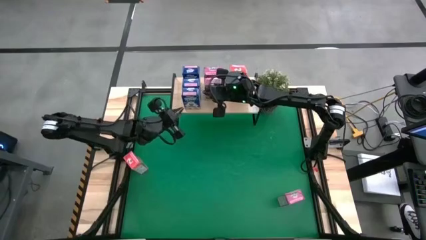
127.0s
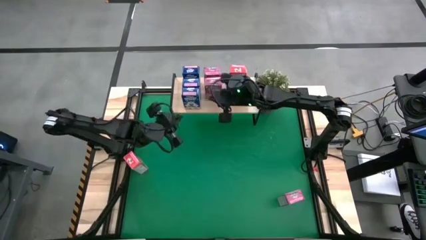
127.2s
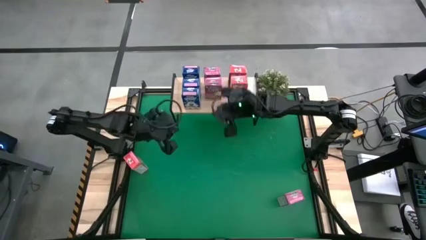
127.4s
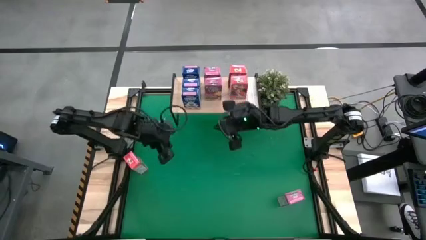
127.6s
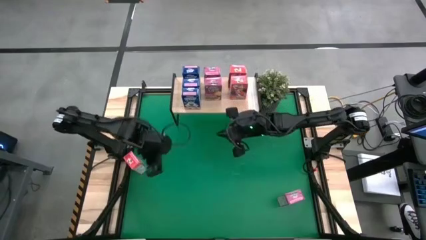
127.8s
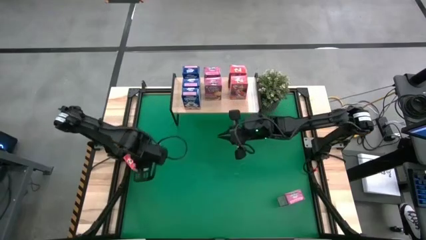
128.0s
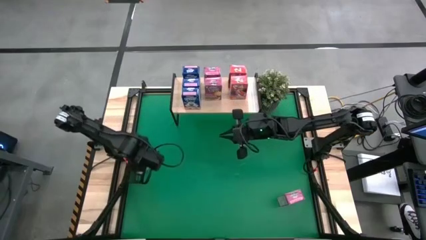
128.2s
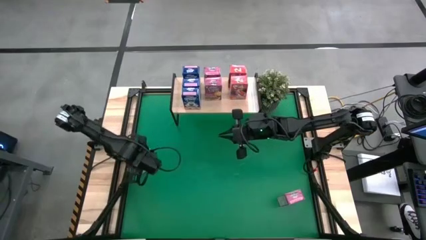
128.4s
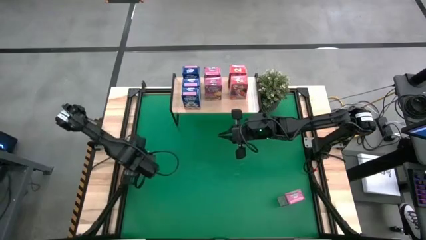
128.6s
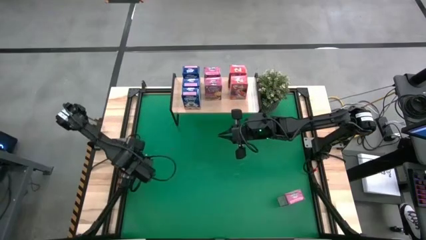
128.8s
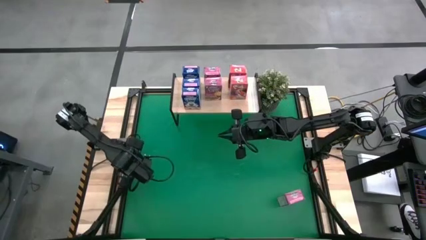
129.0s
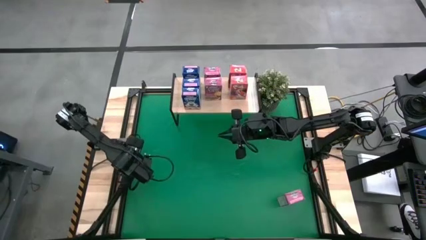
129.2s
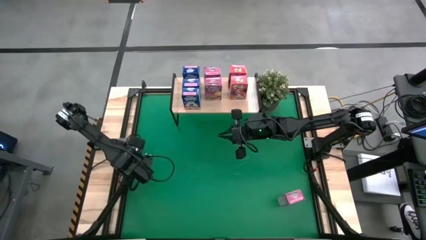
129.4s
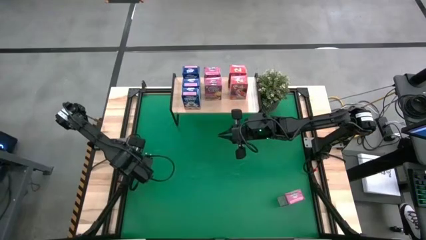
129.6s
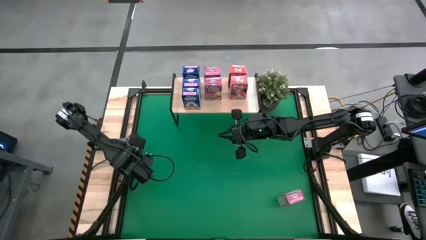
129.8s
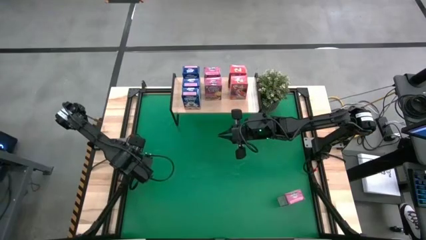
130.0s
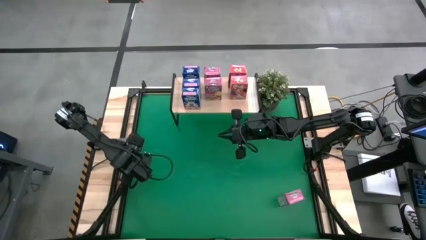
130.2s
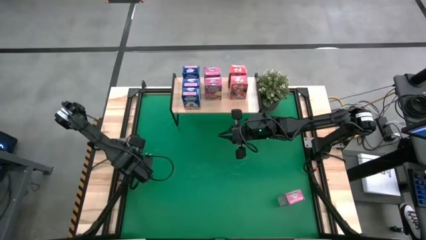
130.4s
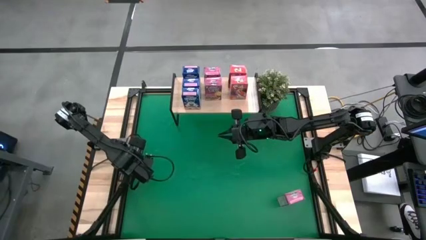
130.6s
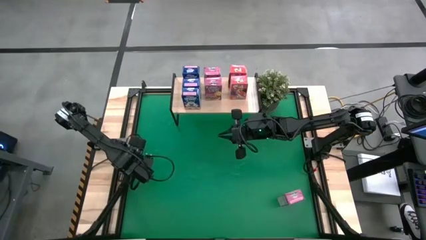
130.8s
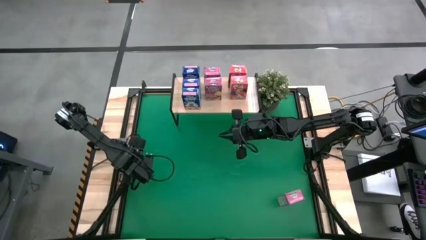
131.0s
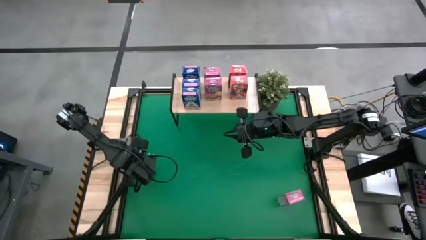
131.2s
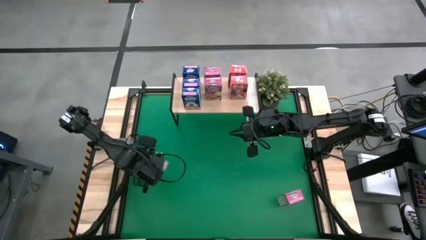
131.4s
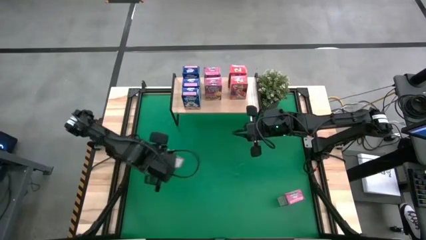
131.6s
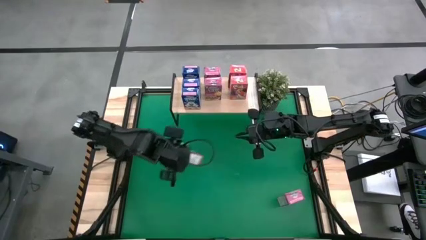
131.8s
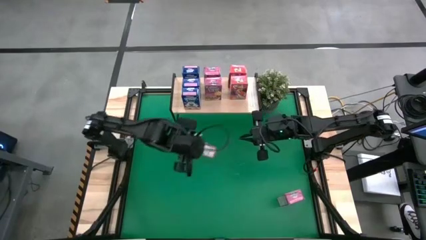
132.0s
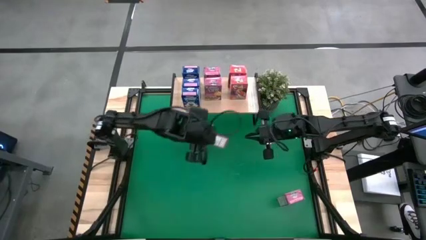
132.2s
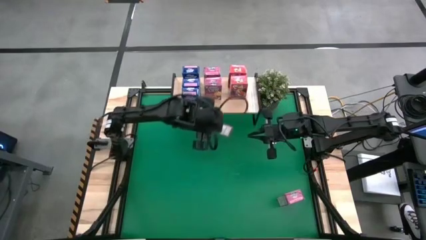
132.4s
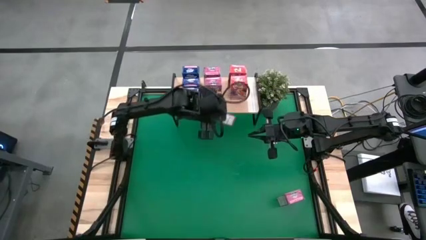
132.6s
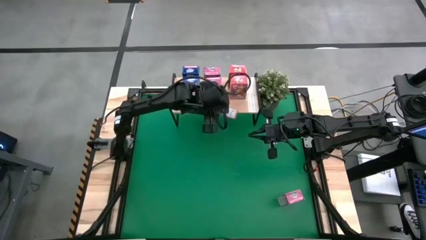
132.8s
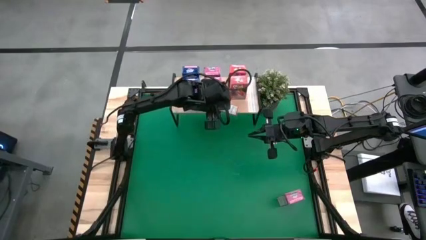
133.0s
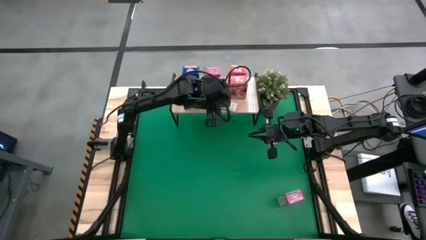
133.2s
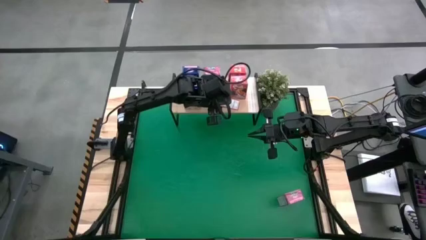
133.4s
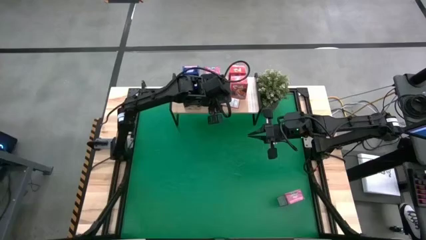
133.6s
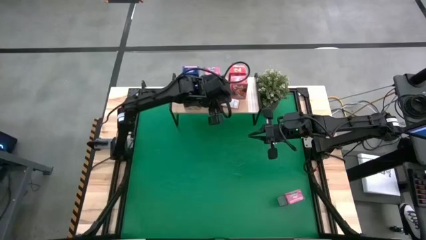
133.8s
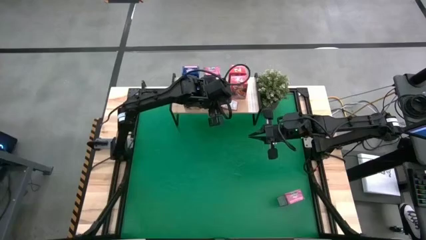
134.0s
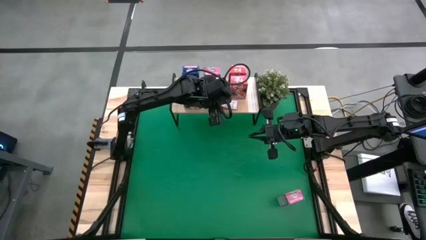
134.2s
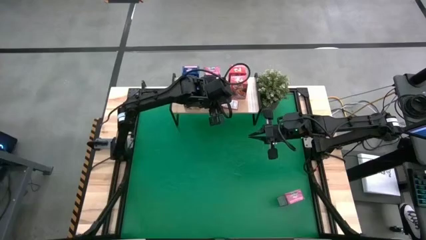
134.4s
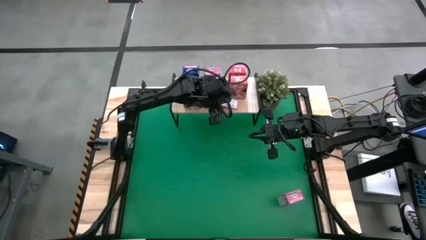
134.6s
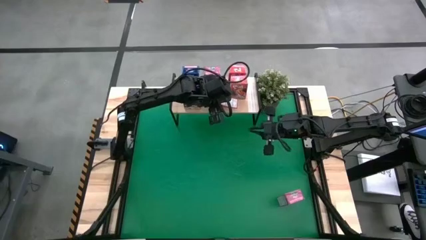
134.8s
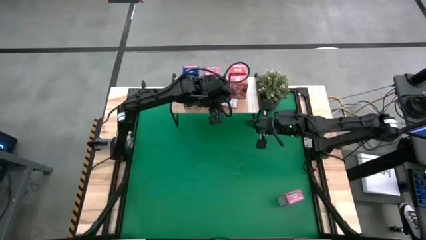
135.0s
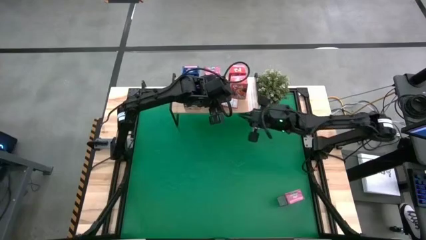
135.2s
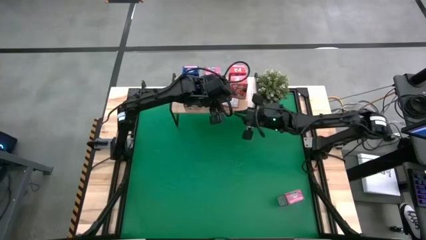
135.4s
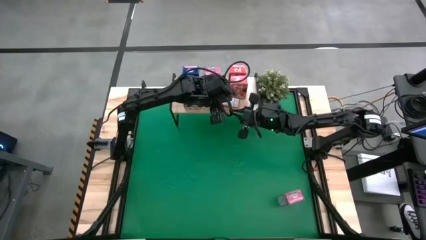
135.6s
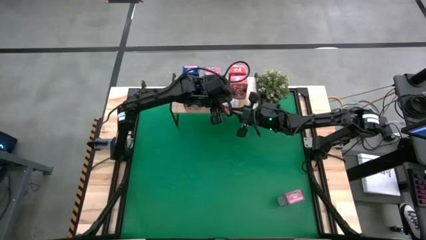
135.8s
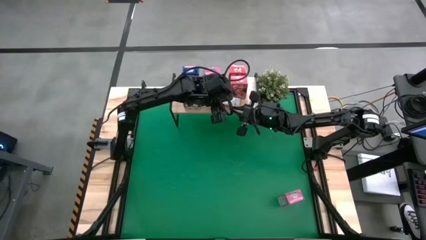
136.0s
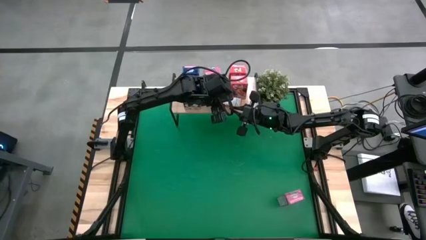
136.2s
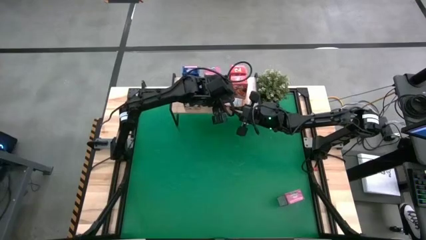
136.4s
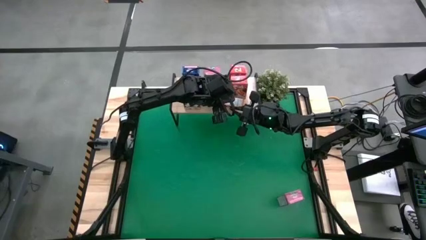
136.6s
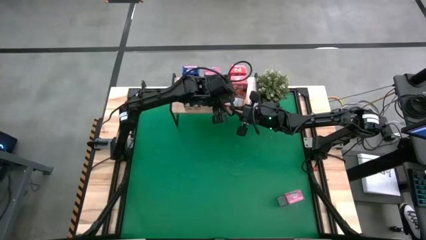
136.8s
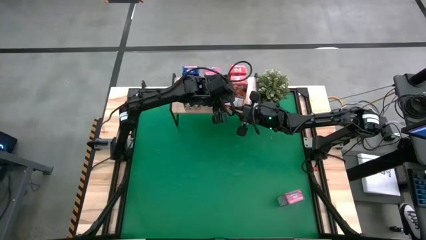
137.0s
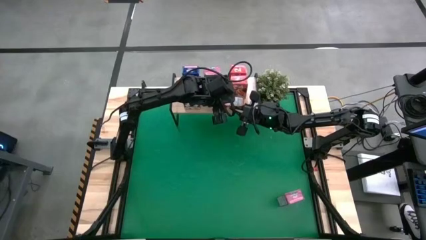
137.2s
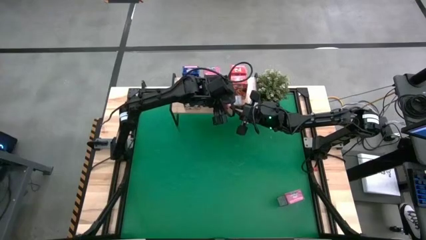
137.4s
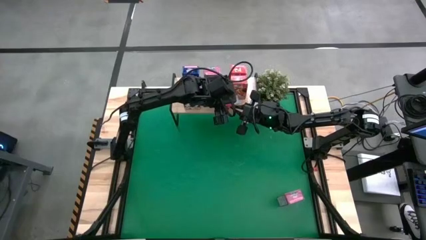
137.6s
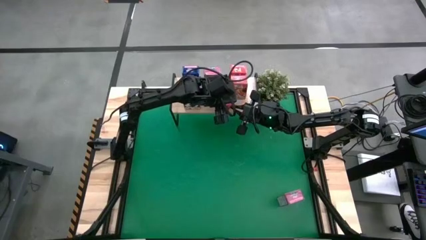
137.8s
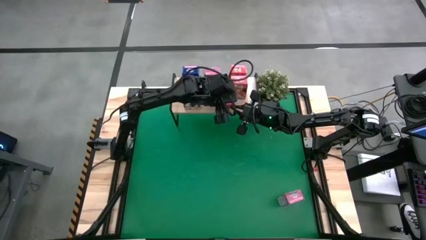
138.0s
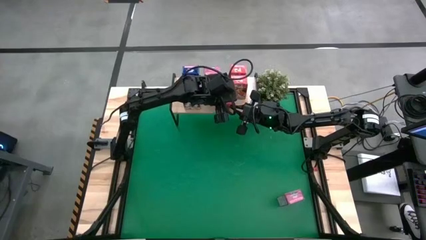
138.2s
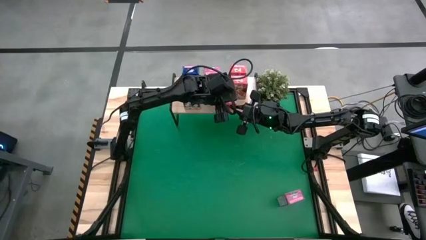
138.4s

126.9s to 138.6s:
Task: Stack cereal on shelf
Put the red cereal box on the shelf aligned with the red cereal boxes

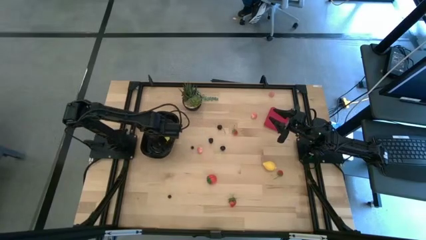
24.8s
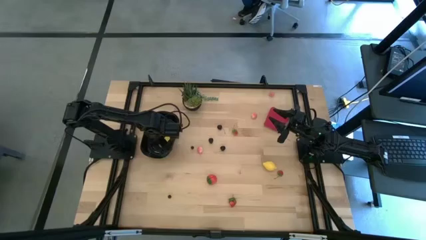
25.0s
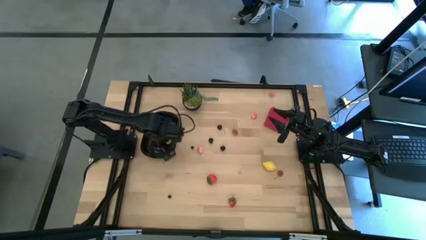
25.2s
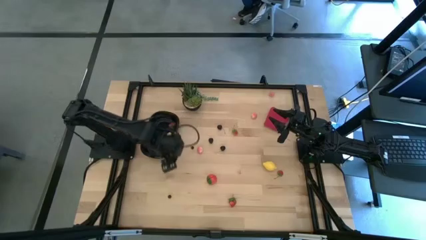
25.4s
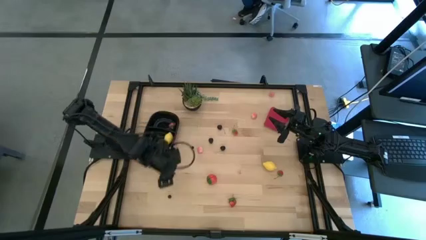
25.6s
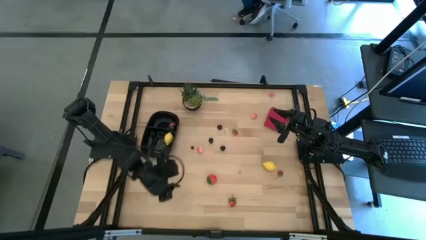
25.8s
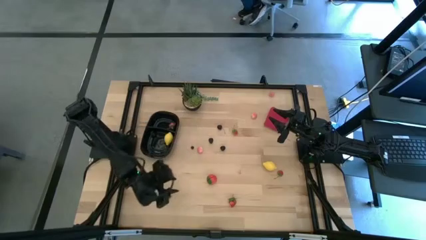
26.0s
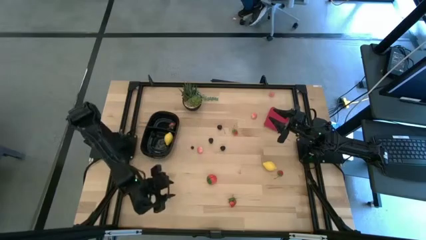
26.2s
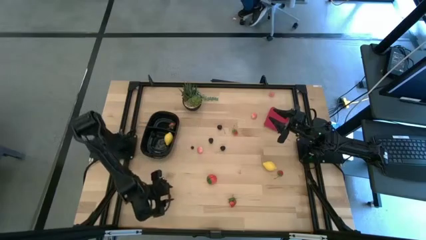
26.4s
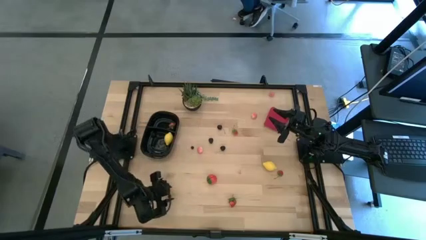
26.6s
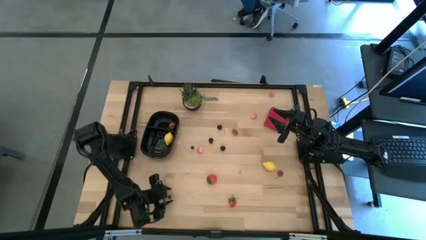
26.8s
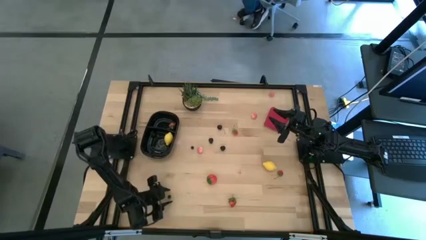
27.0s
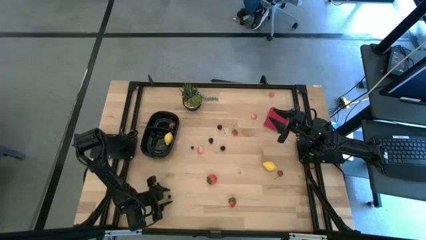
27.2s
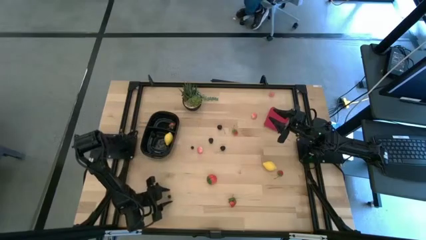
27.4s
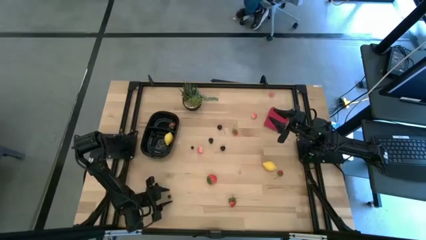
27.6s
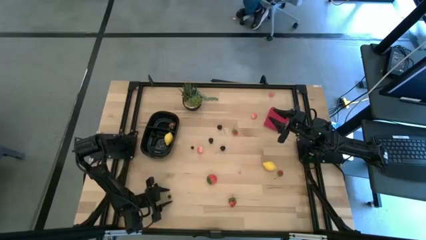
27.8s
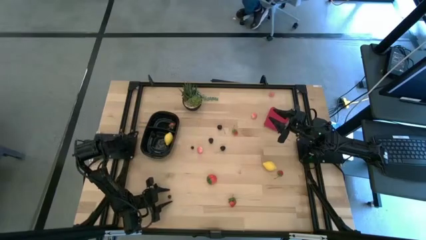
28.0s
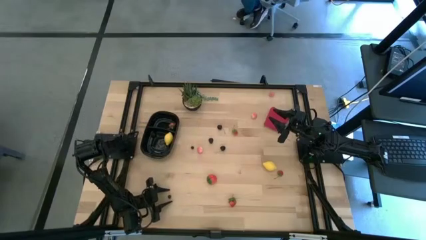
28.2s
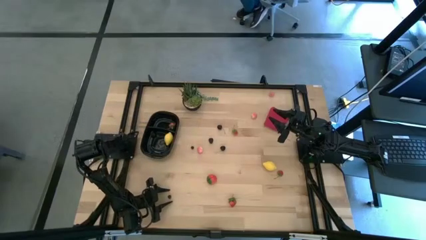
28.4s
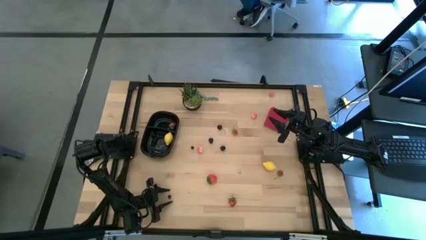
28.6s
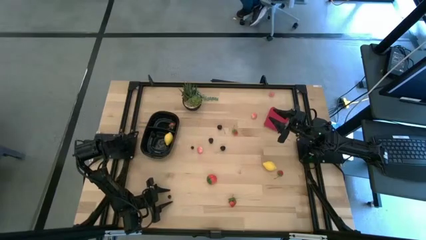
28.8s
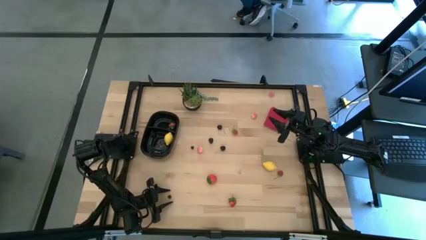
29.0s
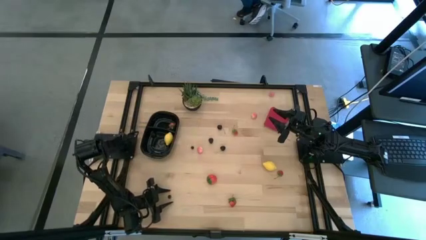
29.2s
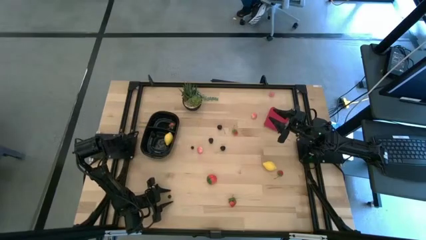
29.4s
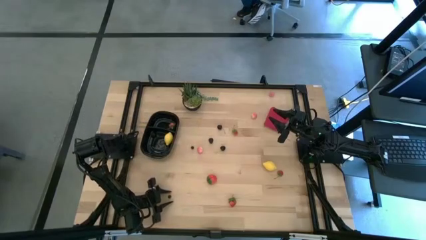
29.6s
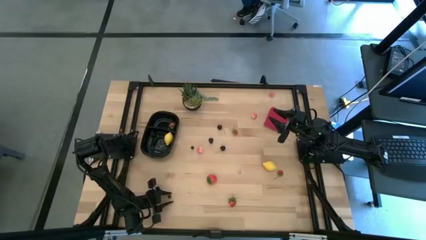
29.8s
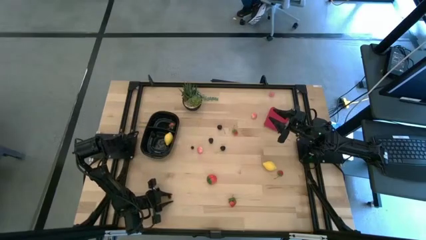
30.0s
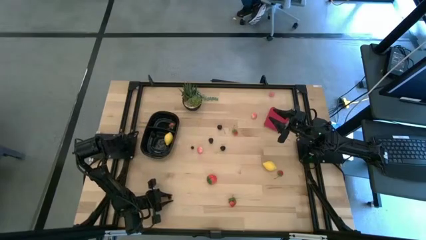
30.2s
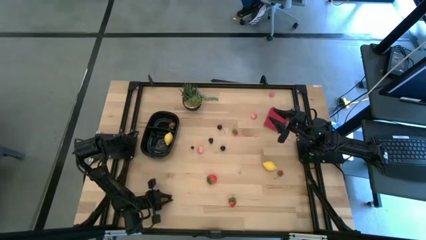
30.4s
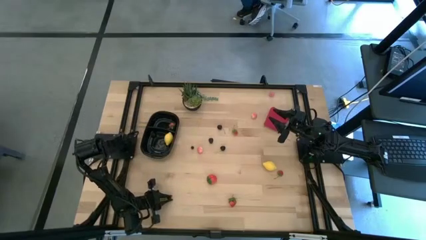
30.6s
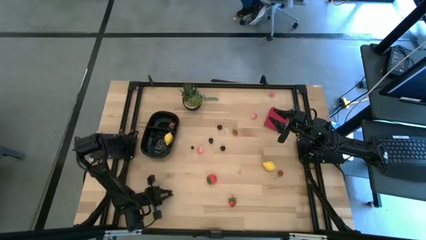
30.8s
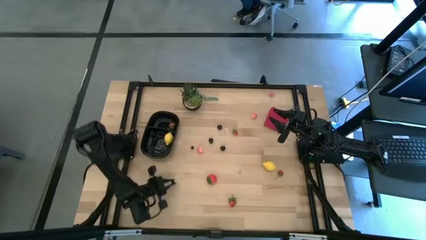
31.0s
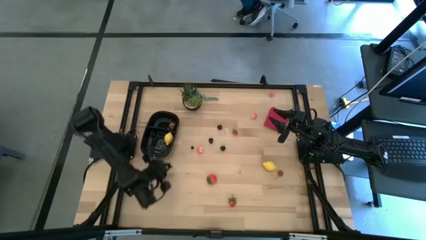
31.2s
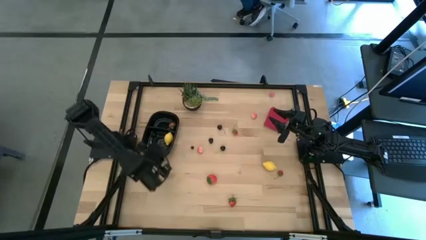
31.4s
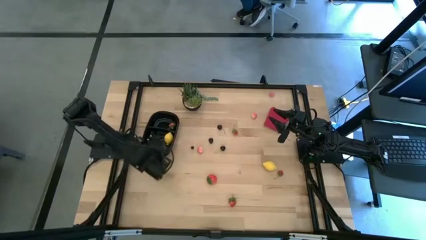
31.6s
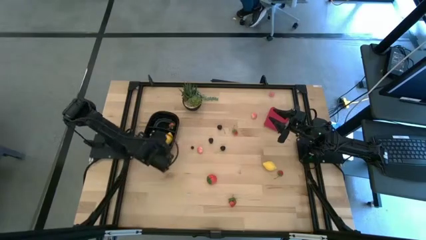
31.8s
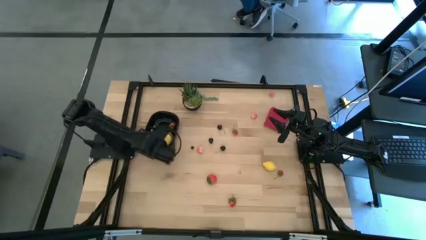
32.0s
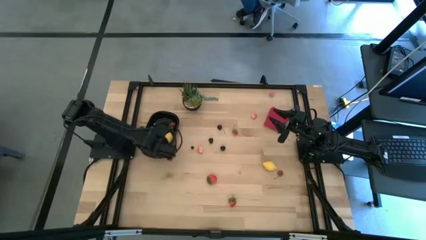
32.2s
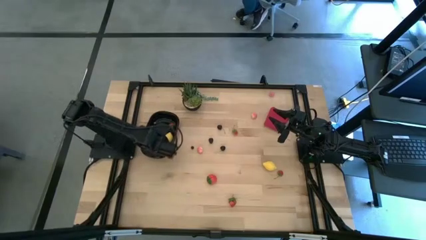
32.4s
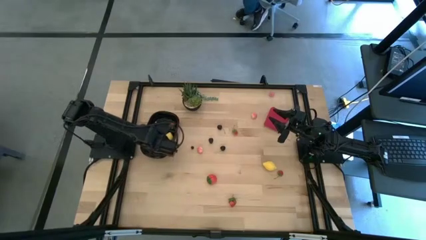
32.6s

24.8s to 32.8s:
Task: Pick and placing Produce into tupperware
Put the blueberry into the black container
